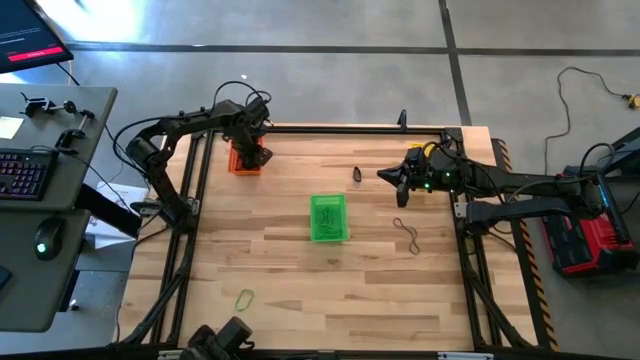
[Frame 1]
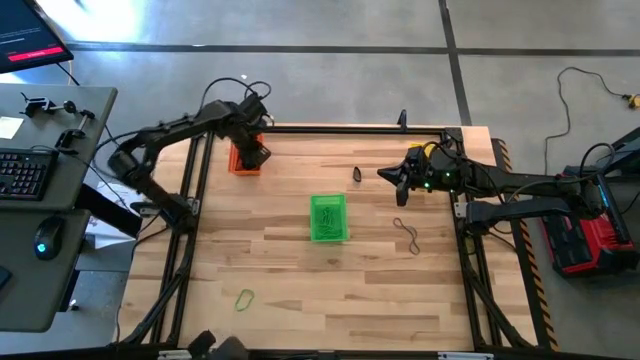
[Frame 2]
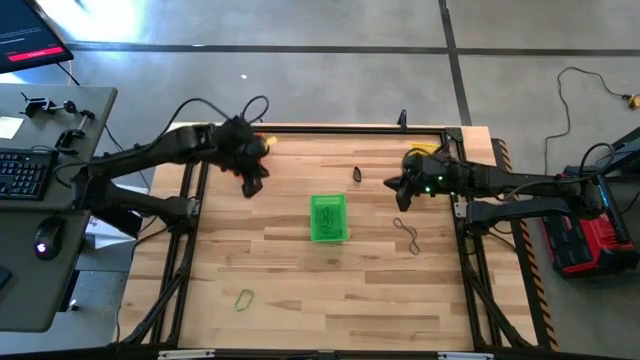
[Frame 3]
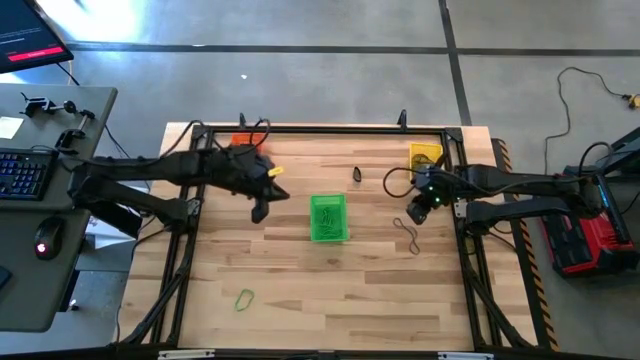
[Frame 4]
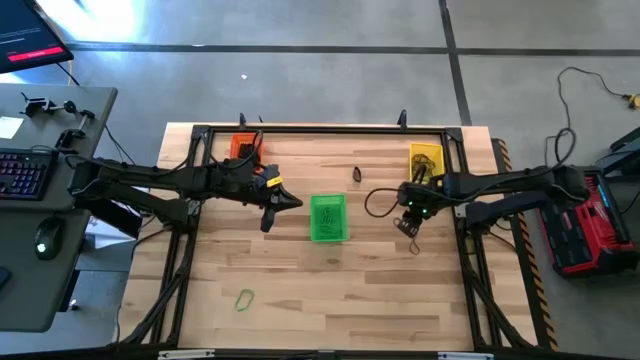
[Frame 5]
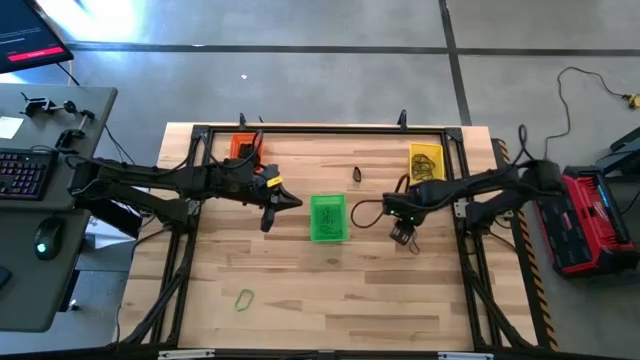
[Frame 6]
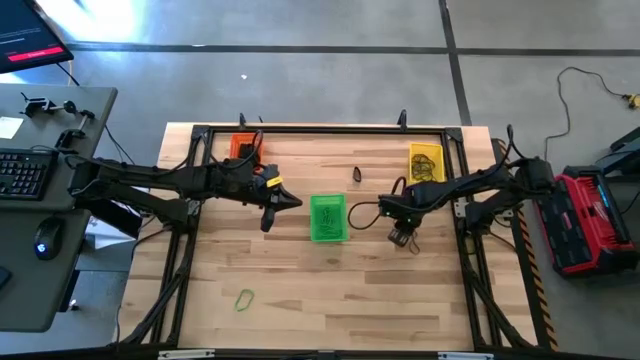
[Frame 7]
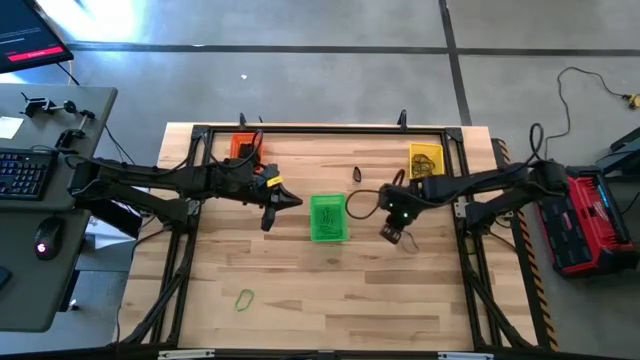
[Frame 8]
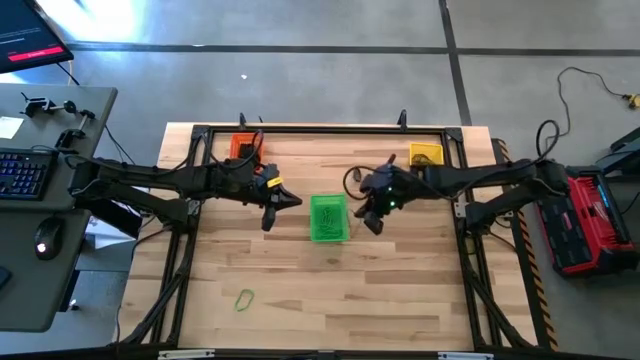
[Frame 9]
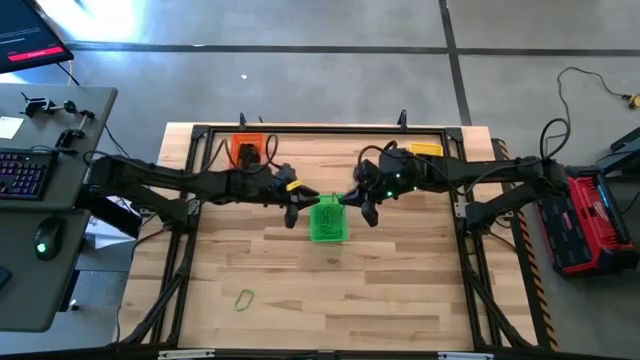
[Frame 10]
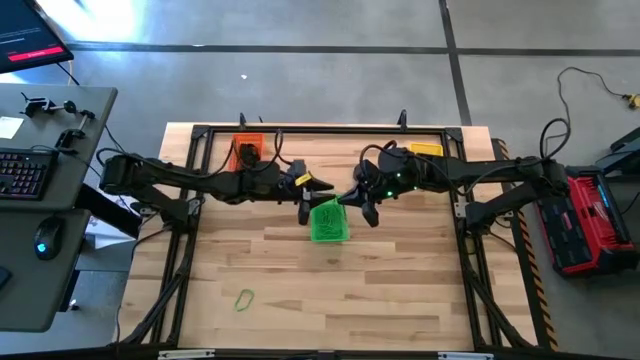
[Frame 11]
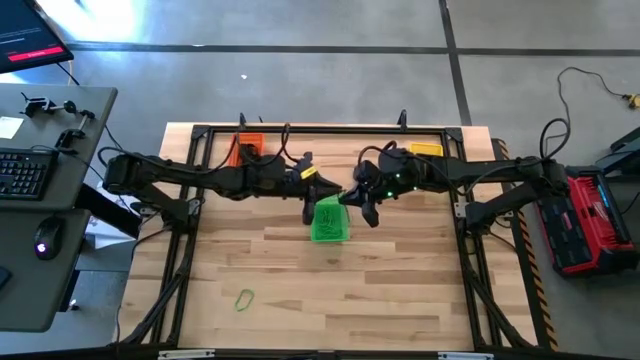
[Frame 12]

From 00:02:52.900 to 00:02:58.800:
Task: Sort rubber bands into baskets
Put the purple rubber band into the yellow bin

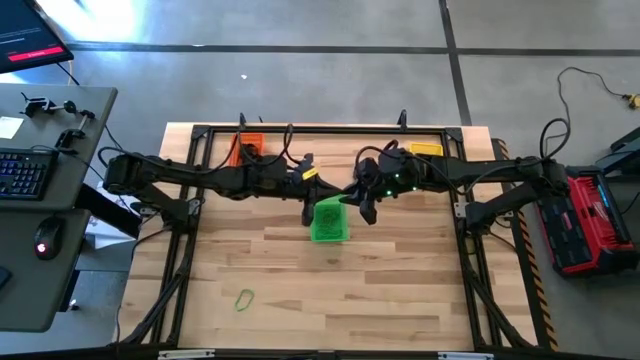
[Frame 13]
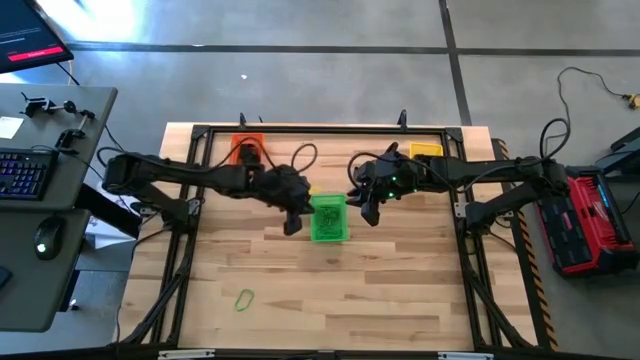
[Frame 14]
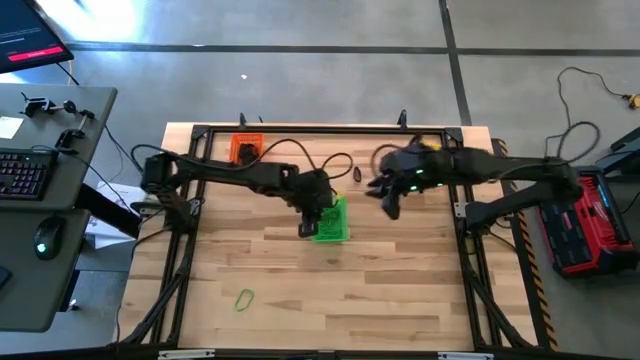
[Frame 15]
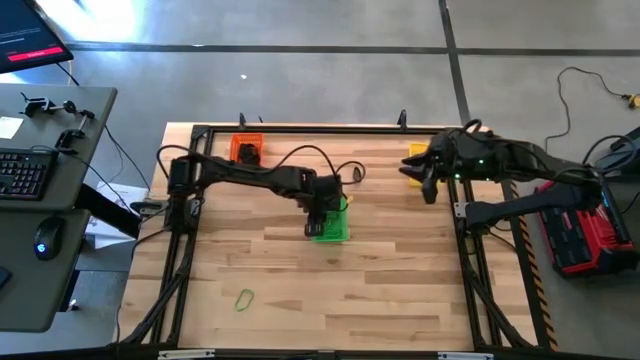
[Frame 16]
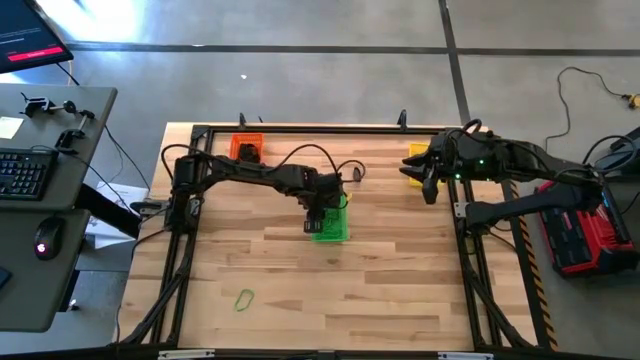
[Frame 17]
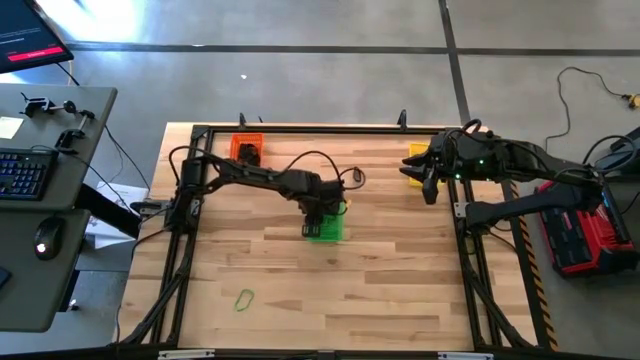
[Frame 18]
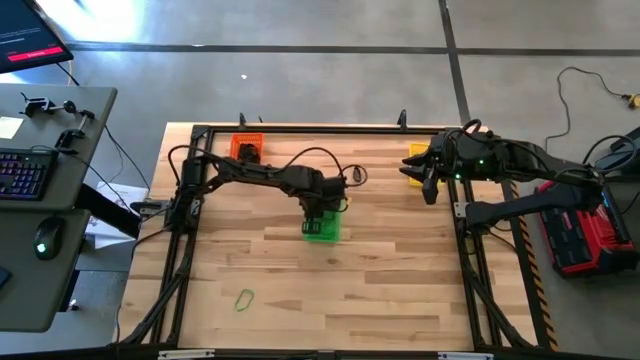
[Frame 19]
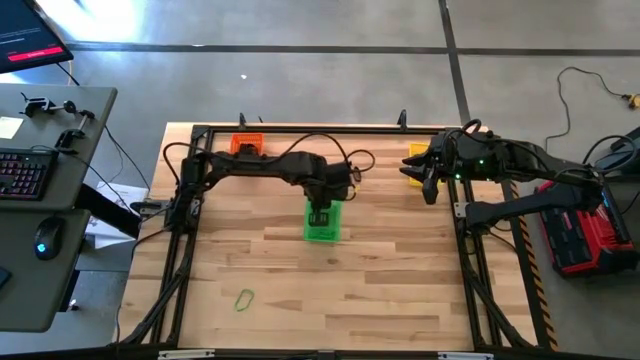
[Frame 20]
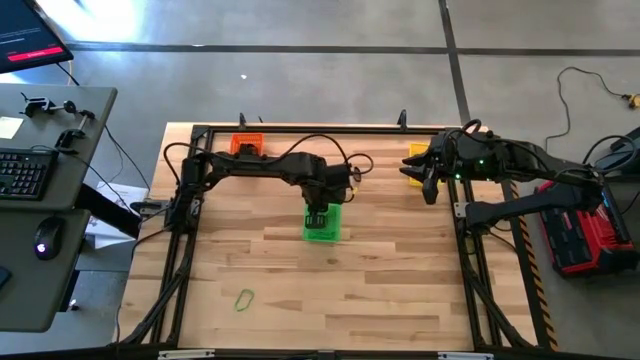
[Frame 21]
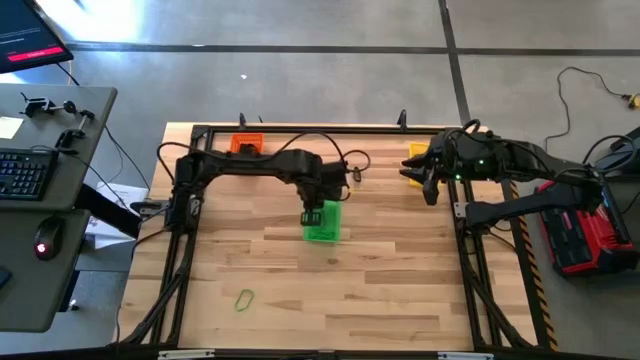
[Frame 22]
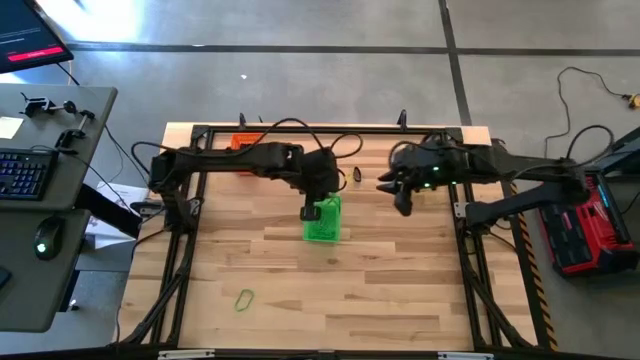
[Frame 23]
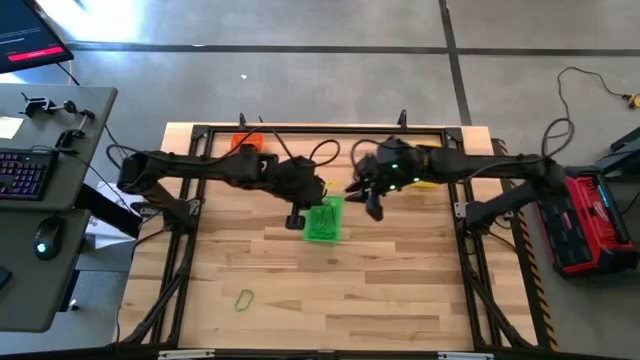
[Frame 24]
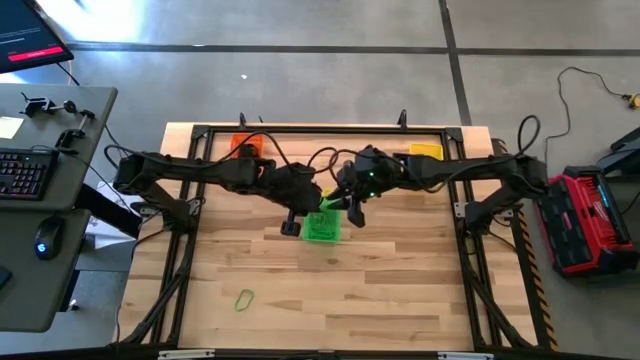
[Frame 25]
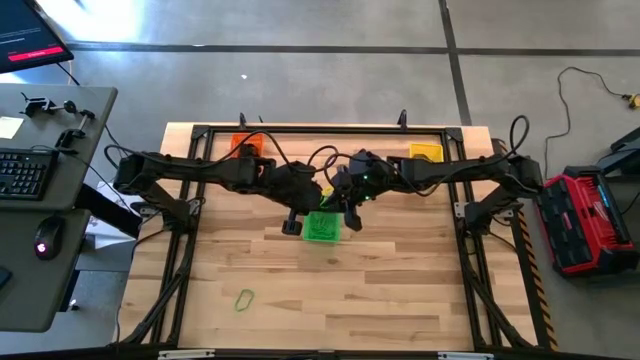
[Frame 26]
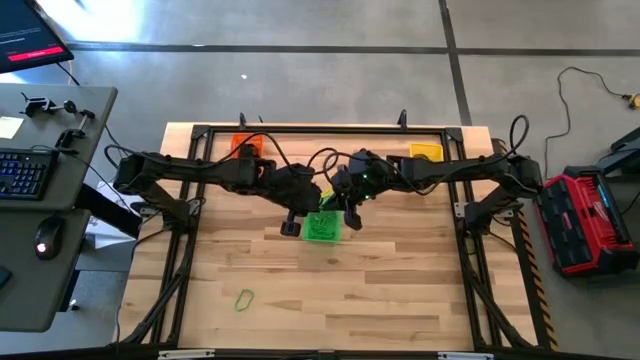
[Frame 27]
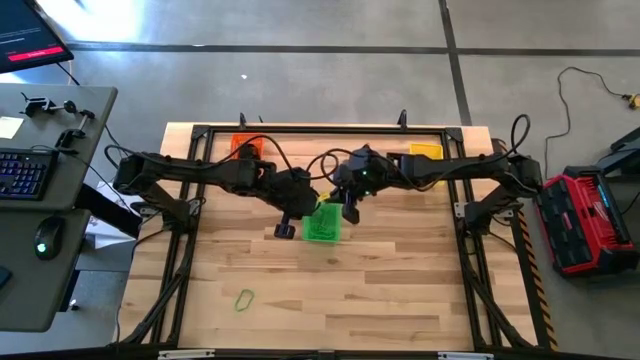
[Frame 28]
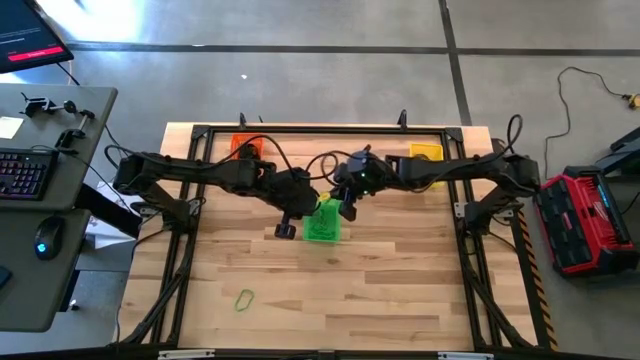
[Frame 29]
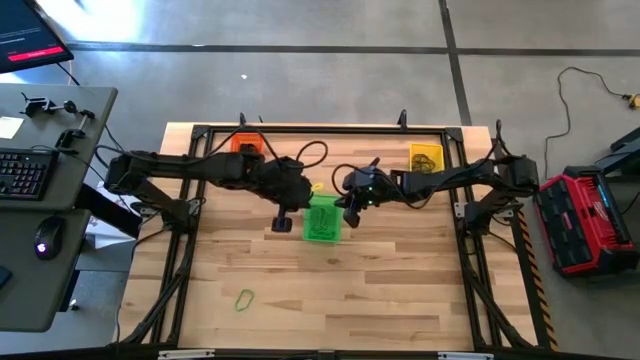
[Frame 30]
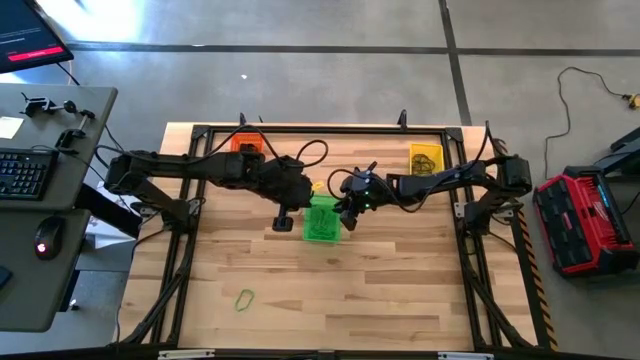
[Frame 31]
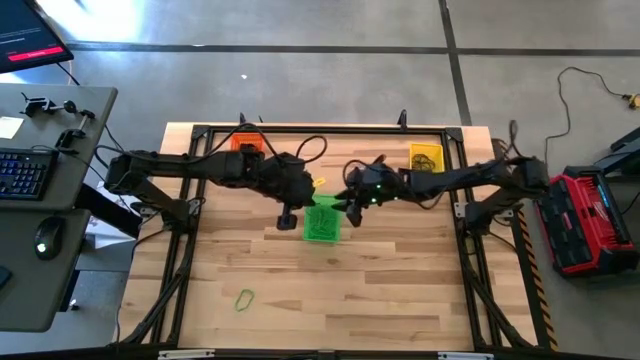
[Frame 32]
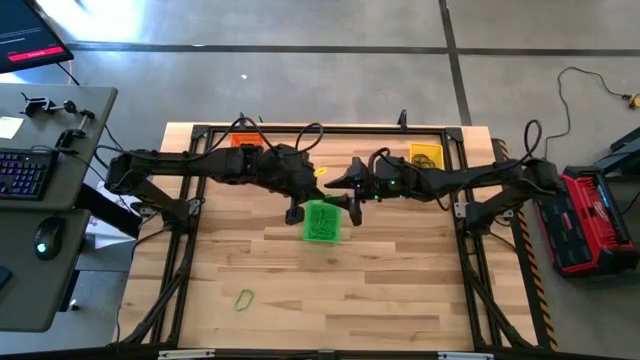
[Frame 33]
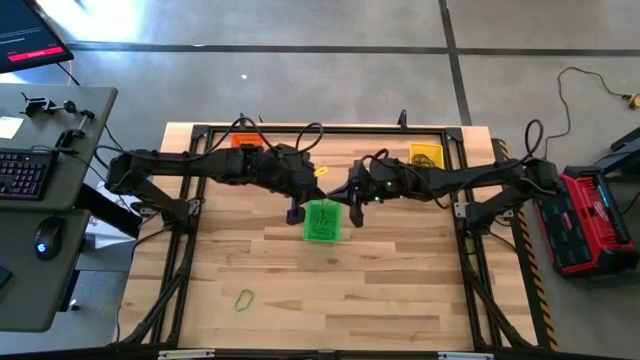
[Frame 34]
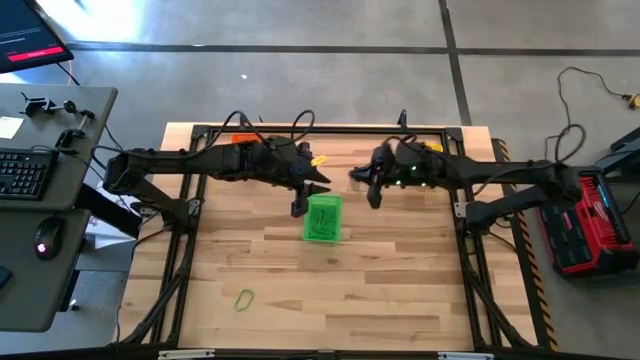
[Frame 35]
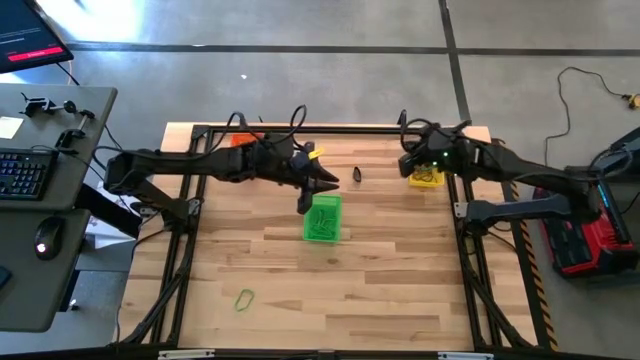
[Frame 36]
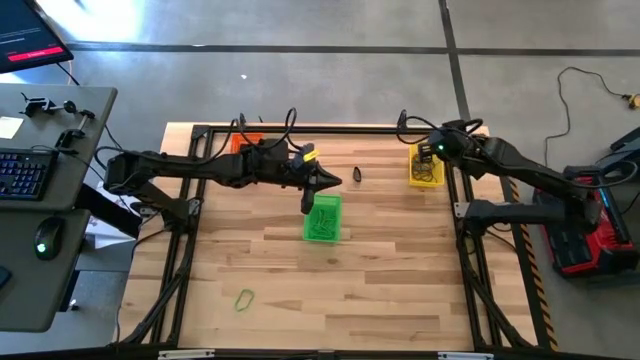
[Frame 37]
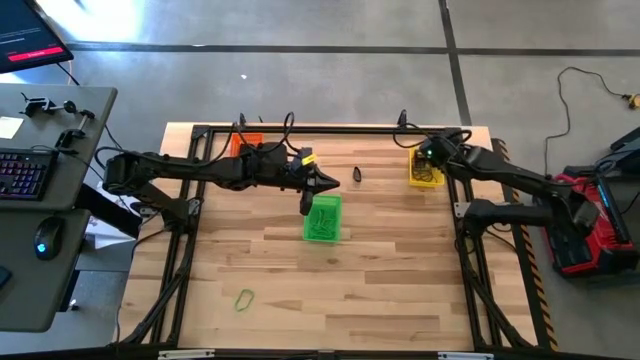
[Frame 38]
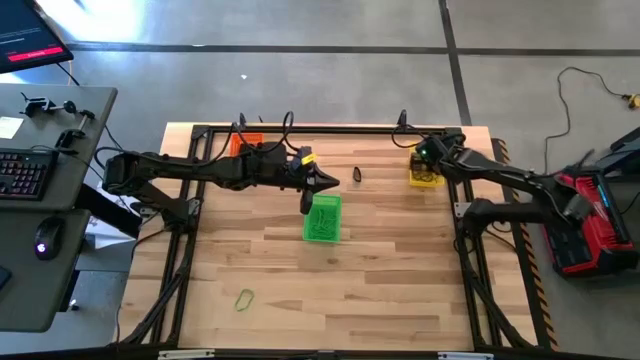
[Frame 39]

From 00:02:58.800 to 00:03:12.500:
Put the purple rubber band into the yellow bin

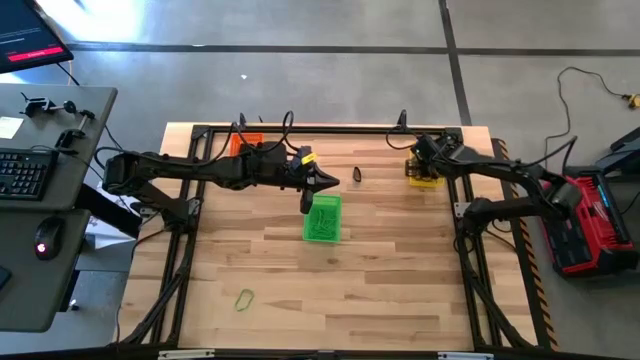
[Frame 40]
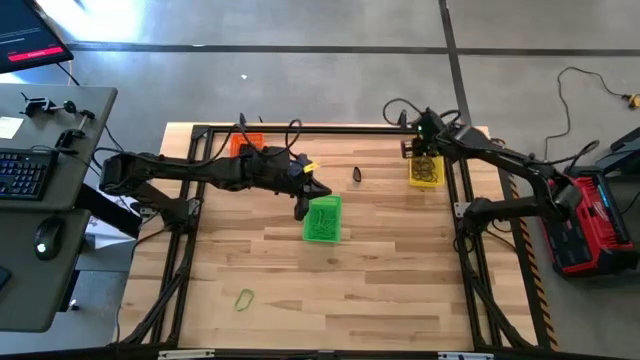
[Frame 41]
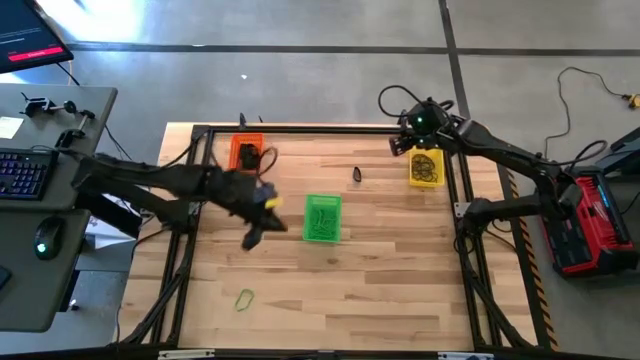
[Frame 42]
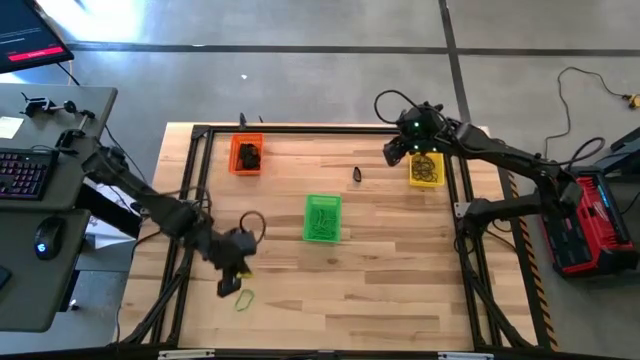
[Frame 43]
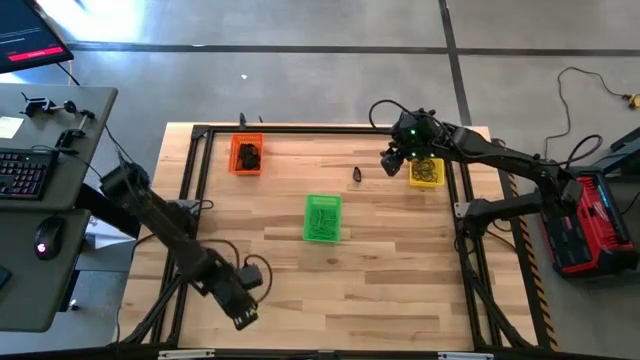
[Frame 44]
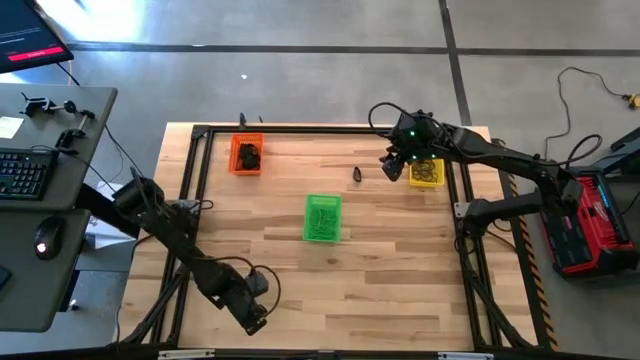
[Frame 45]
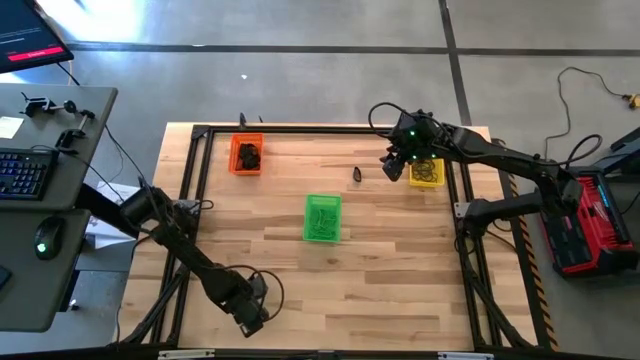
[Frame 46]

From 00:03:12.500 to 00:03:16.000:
Put the green rubber band into the green bin
